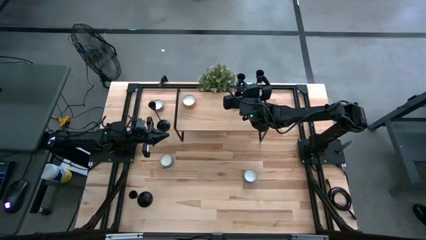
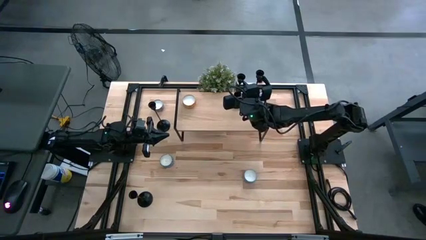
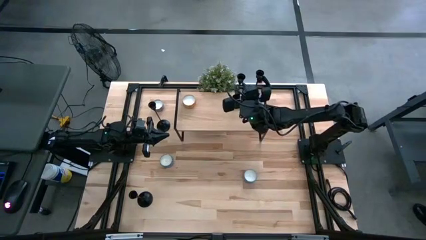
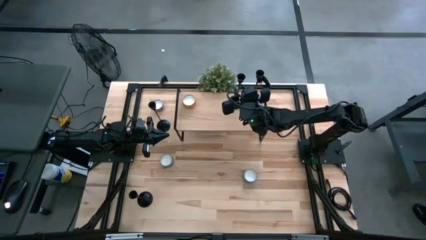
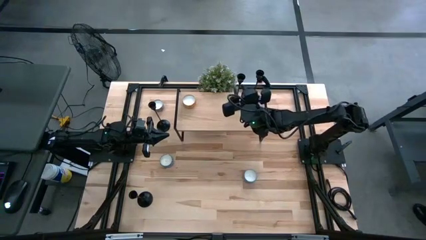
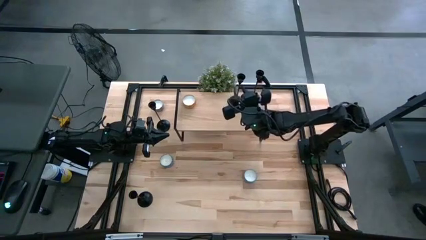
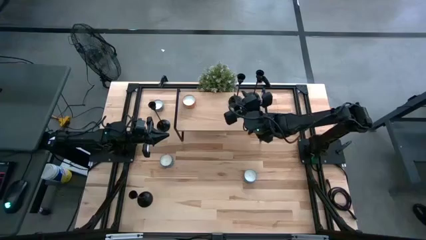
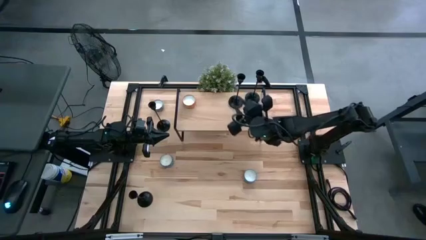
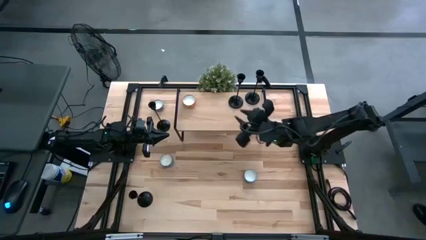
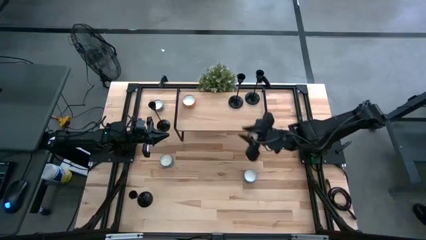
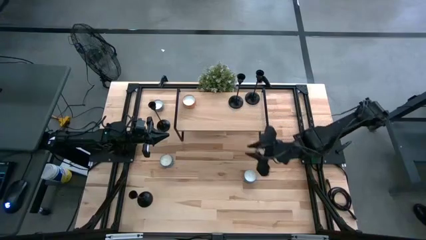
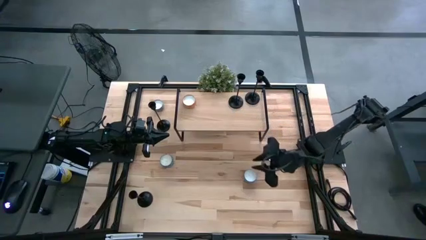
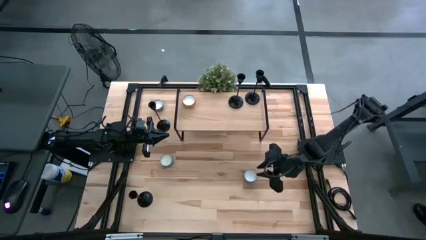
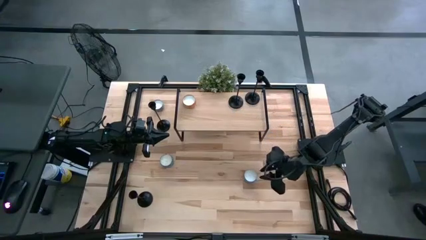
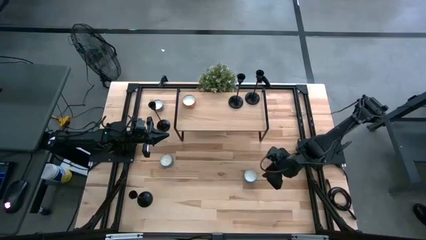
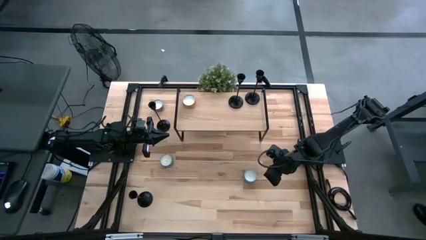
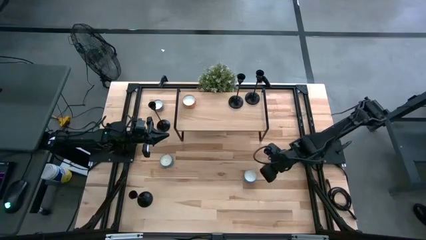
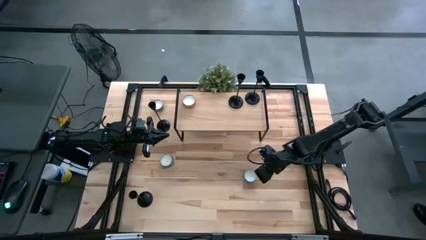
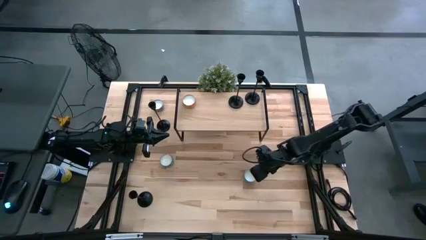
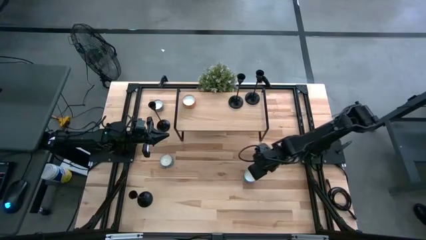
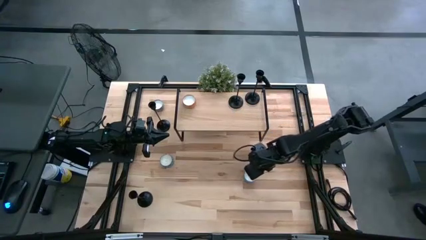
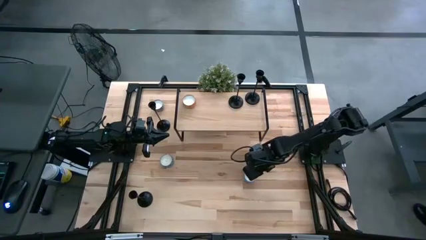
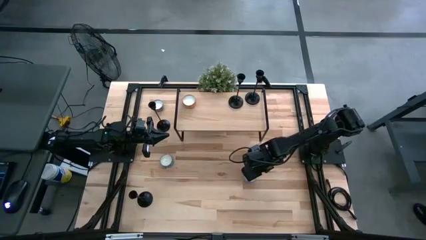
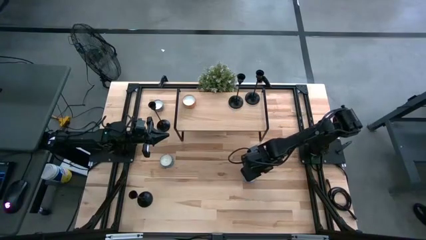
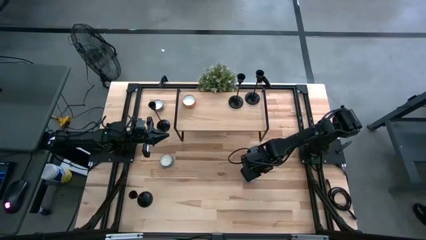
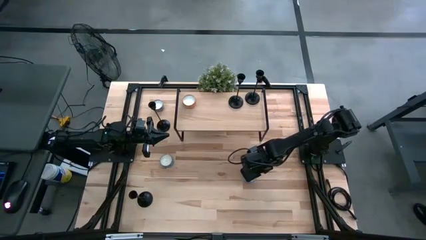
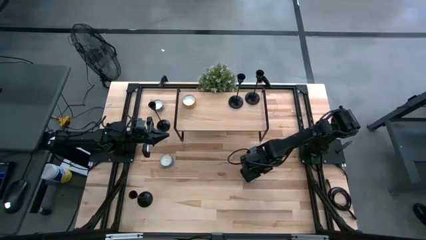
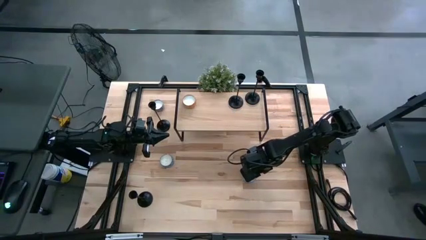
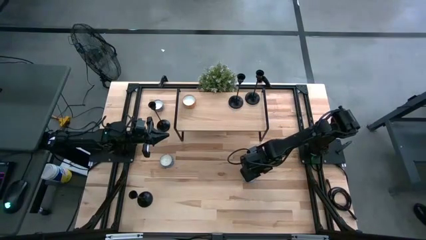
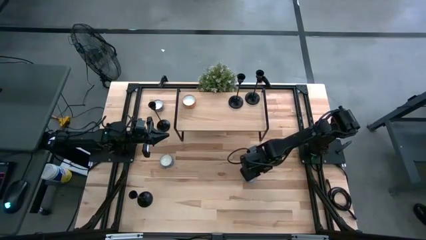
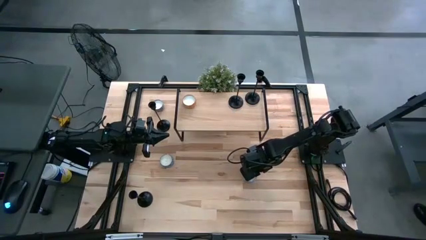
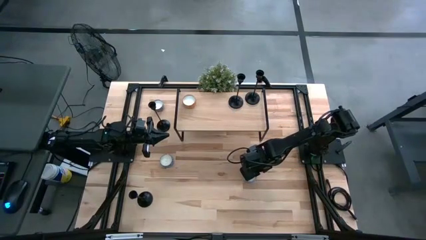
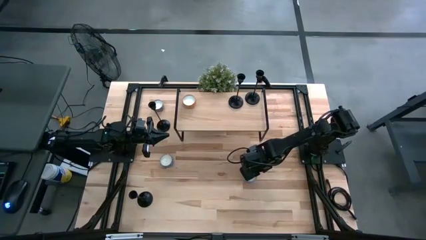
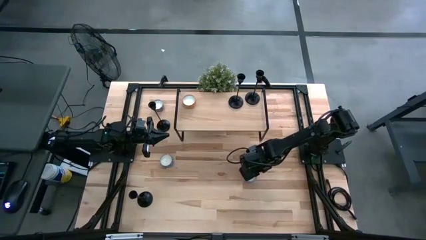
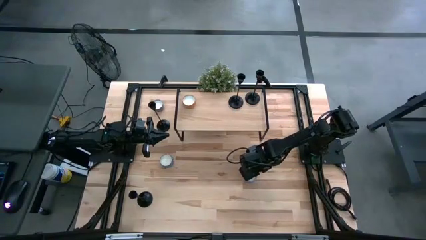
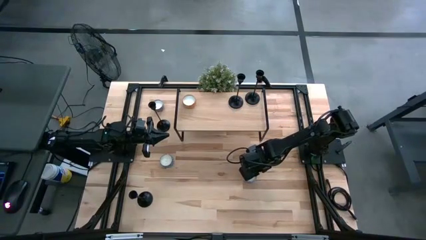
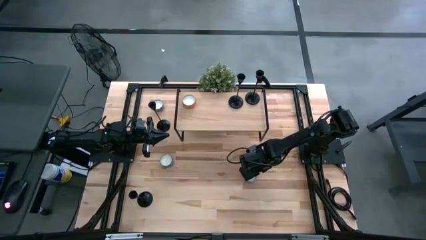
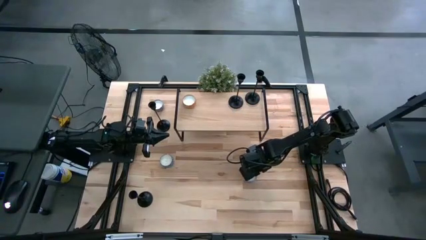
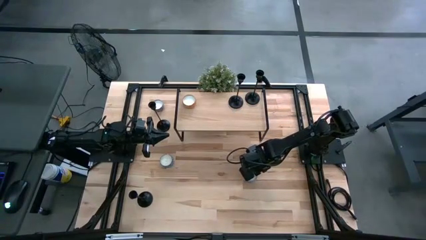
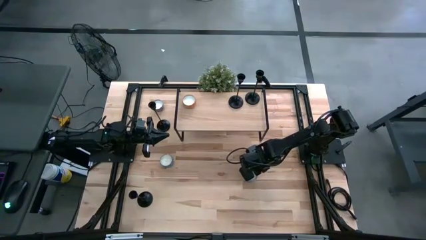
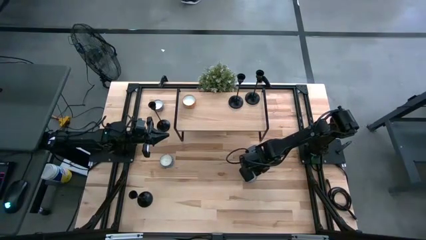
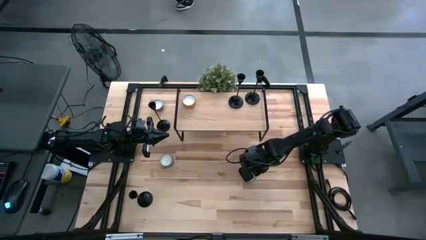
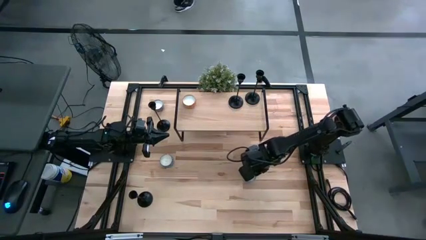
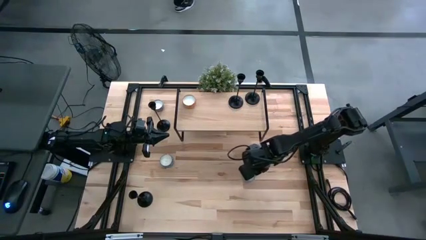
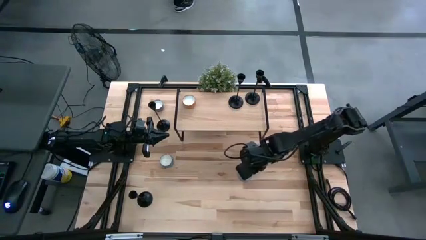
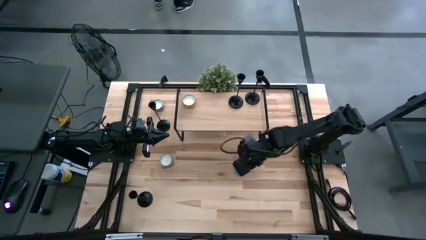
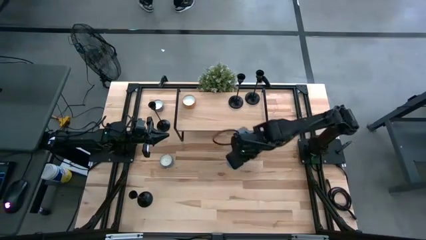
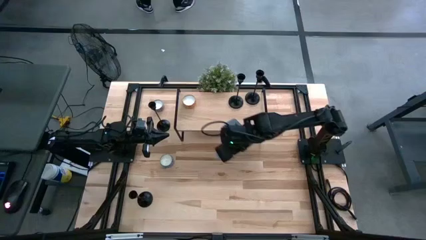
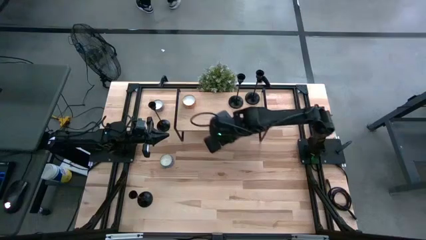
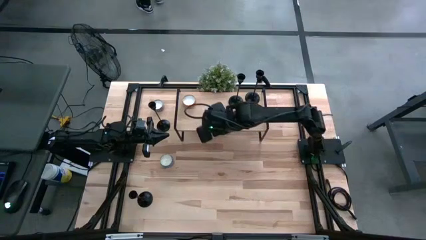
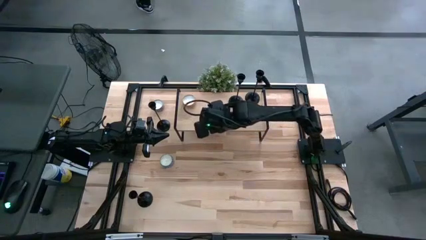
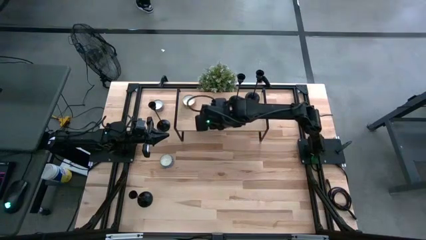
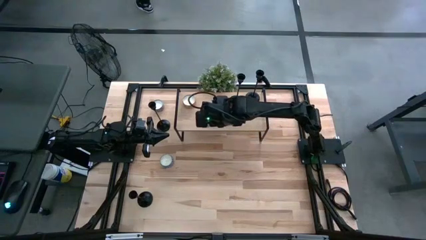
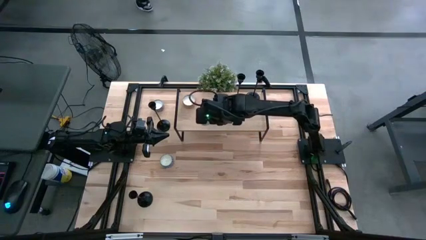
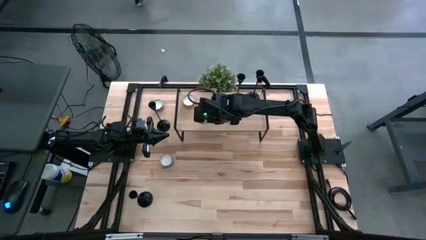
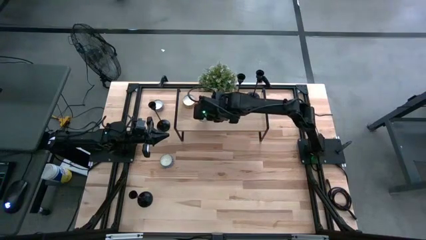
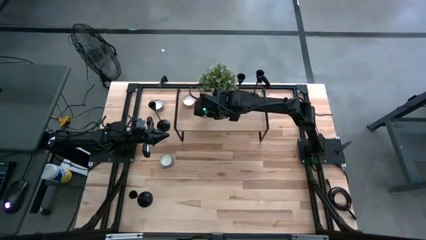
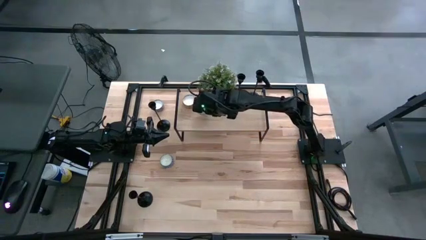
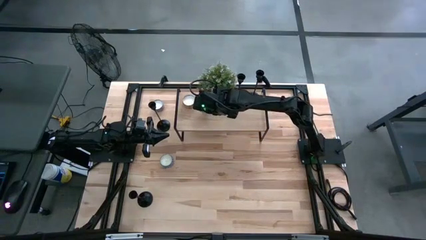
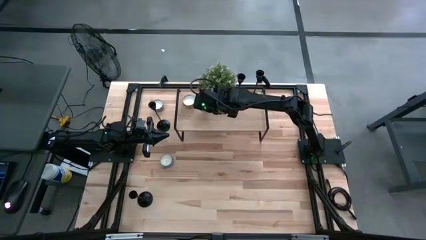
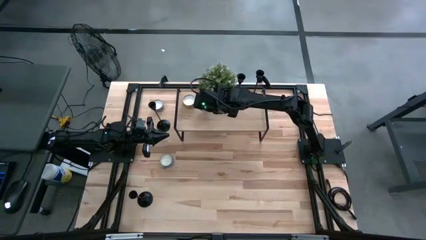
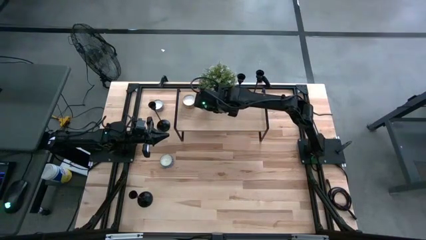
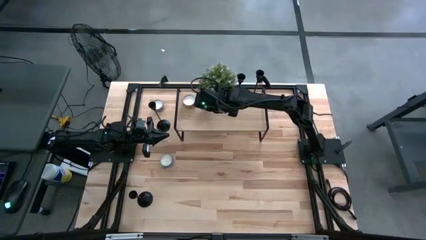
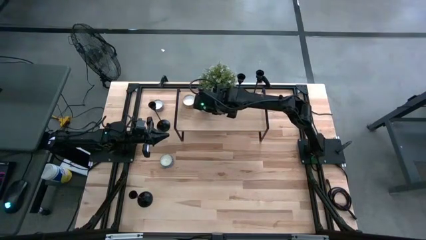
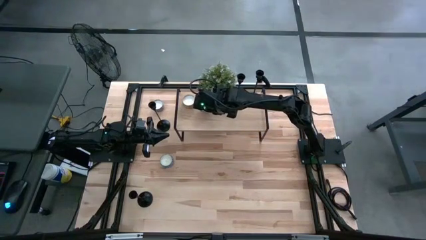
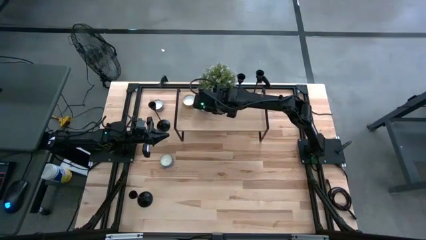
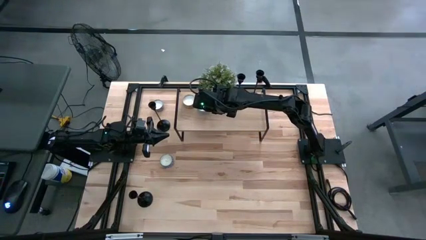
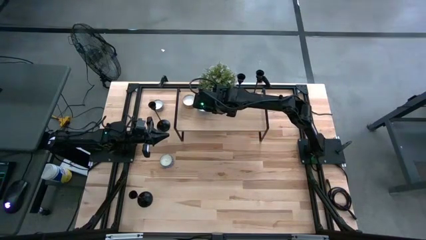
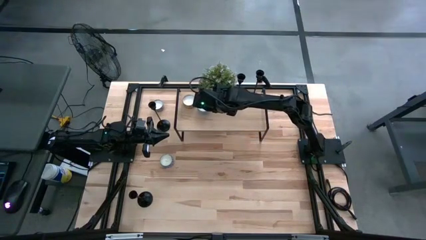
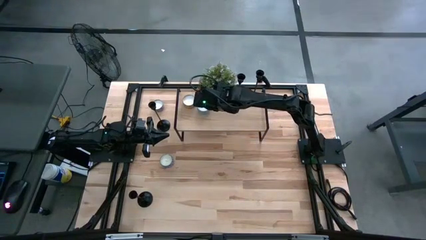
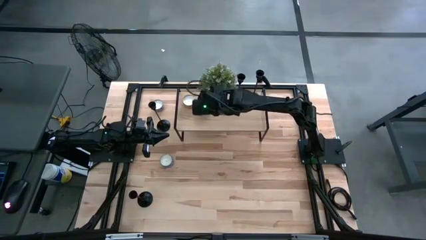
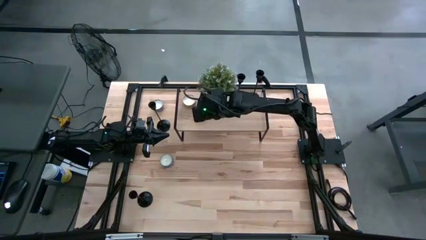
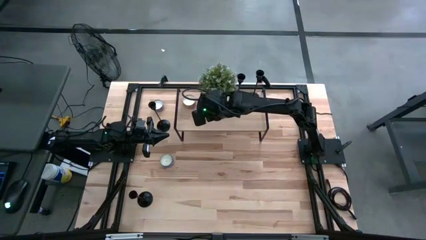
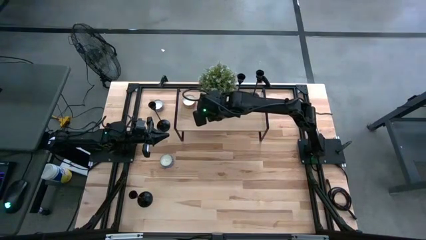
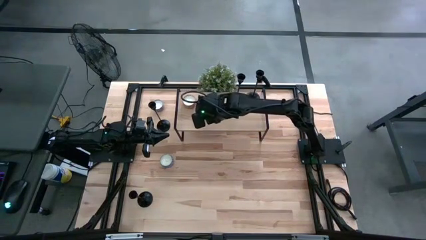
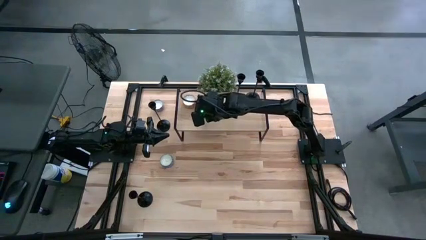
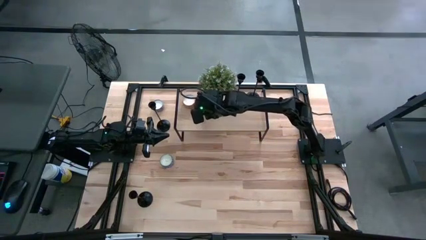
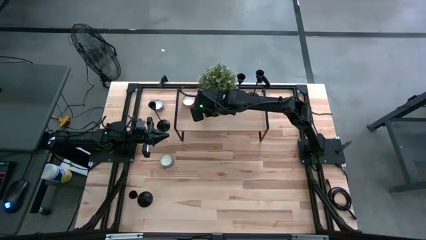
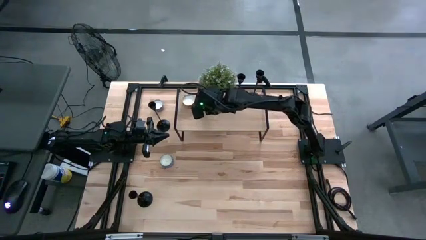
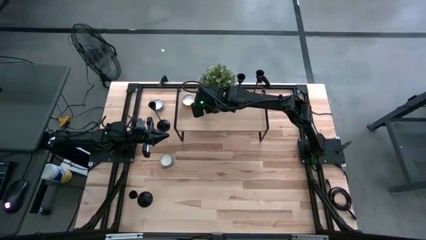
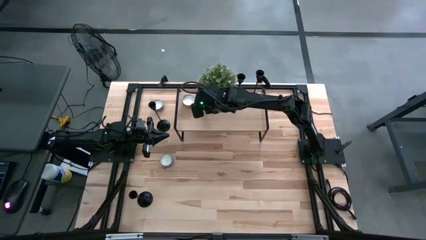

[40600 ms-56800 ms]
Task: Pick & Place candle stick holders
Put the blue scented candle on the shelf
